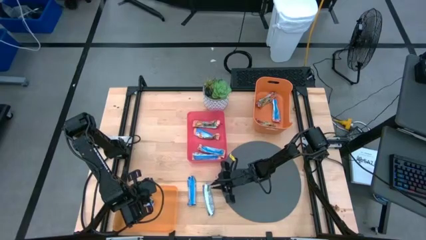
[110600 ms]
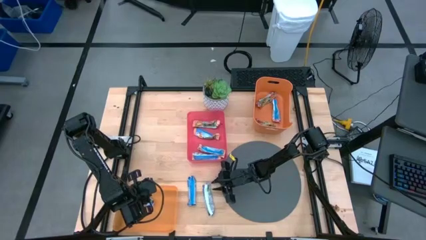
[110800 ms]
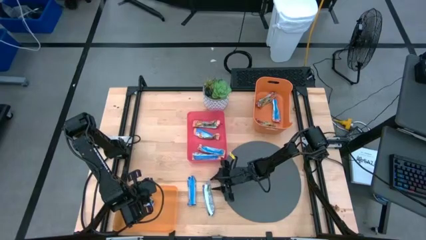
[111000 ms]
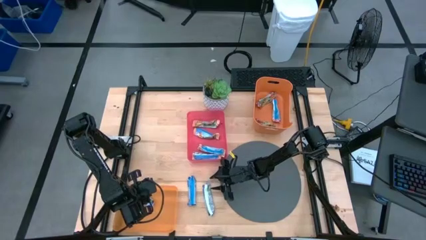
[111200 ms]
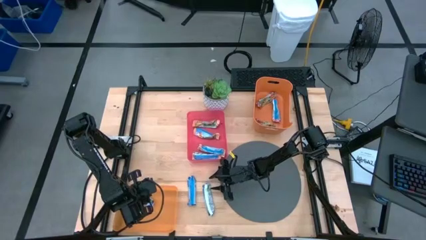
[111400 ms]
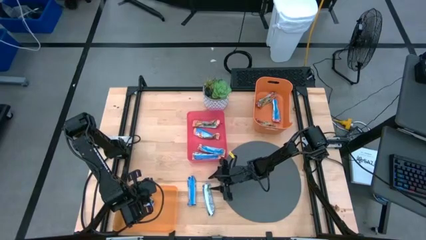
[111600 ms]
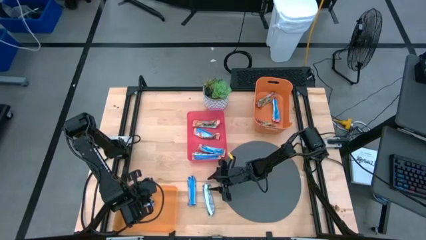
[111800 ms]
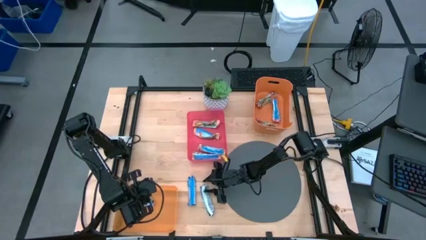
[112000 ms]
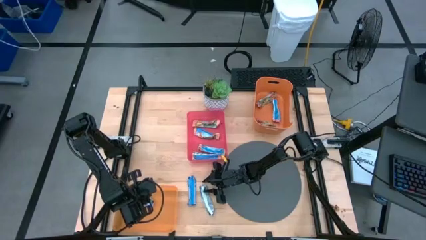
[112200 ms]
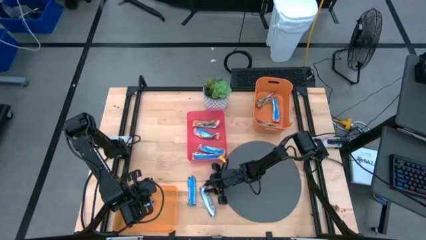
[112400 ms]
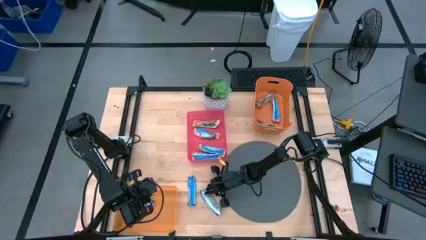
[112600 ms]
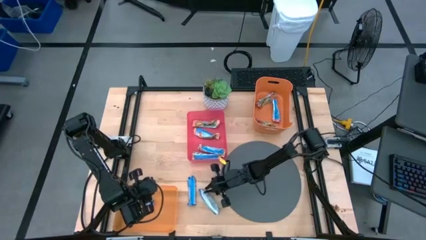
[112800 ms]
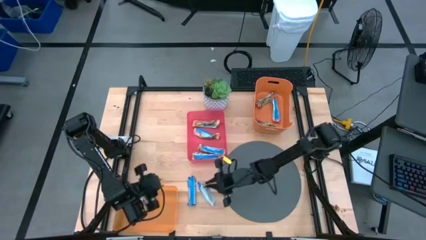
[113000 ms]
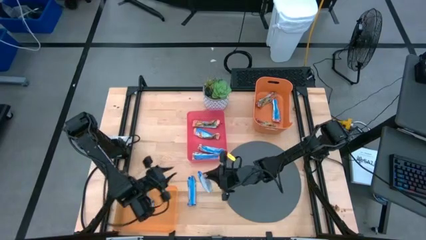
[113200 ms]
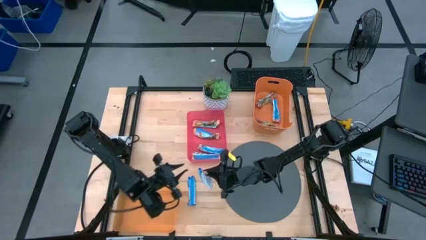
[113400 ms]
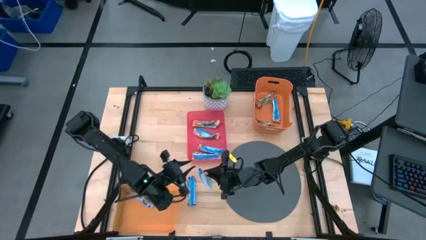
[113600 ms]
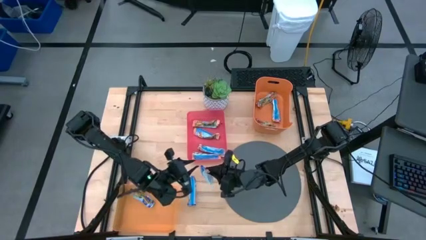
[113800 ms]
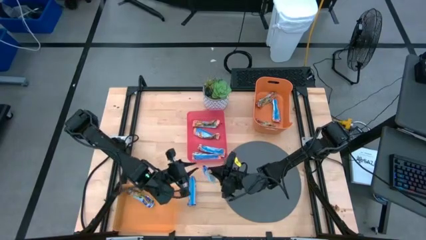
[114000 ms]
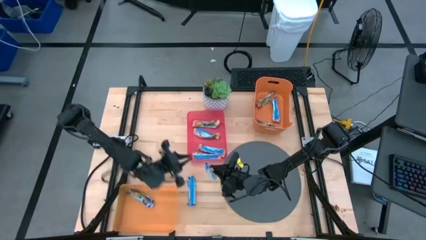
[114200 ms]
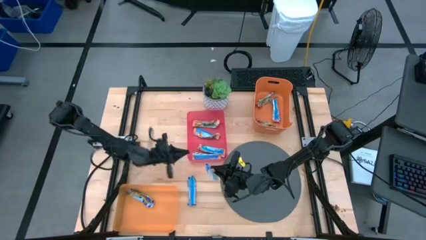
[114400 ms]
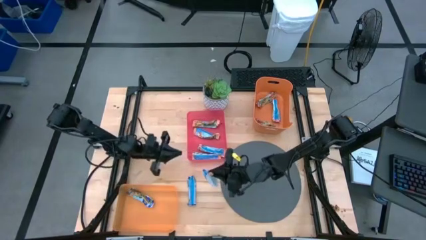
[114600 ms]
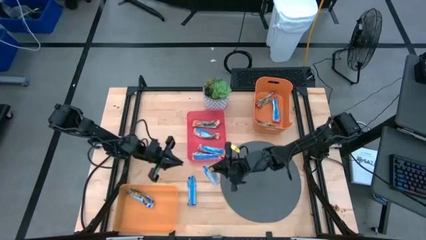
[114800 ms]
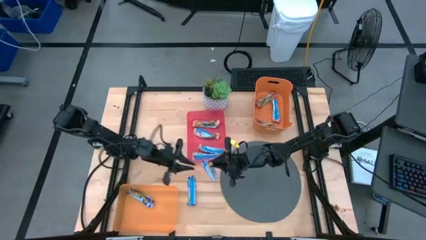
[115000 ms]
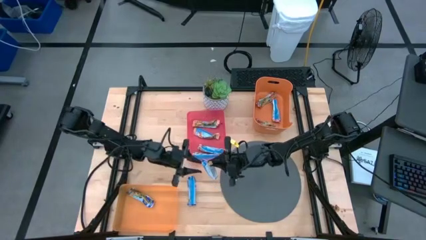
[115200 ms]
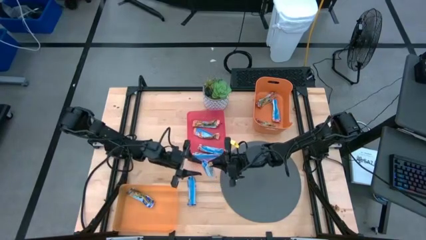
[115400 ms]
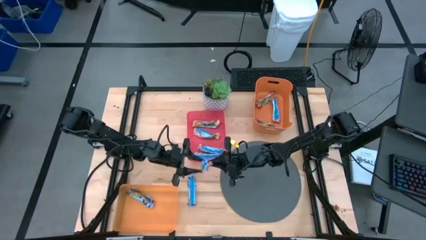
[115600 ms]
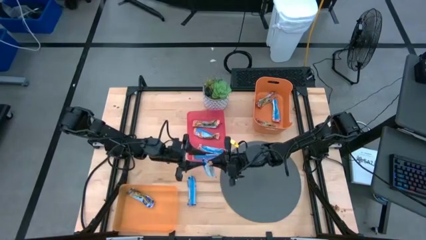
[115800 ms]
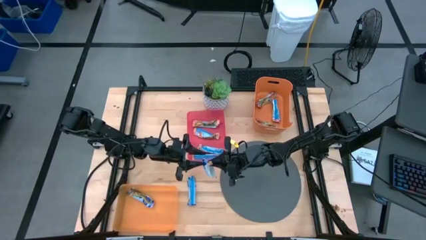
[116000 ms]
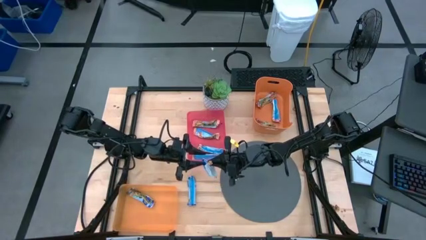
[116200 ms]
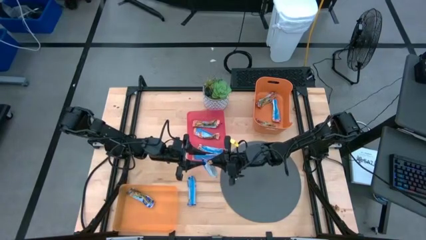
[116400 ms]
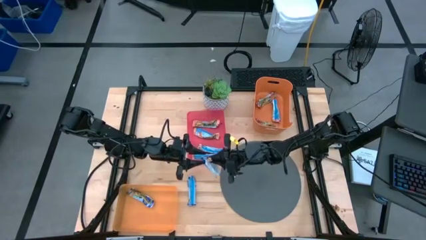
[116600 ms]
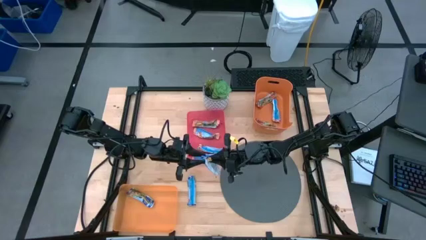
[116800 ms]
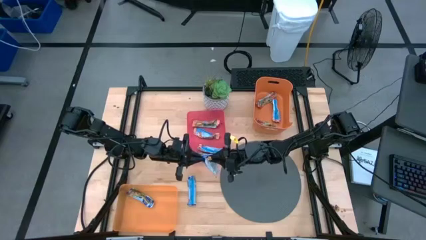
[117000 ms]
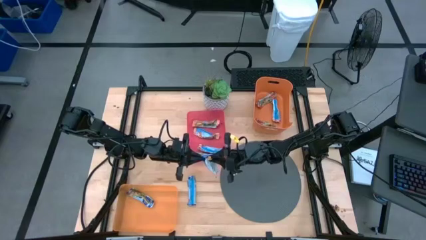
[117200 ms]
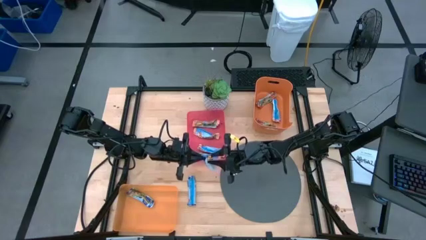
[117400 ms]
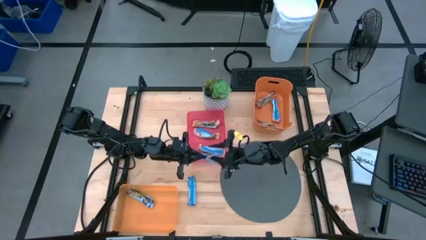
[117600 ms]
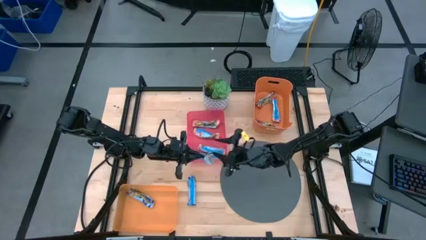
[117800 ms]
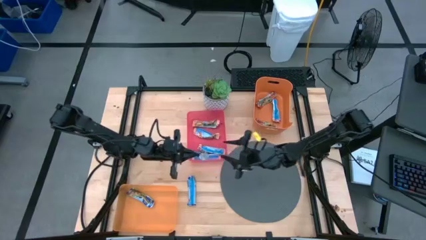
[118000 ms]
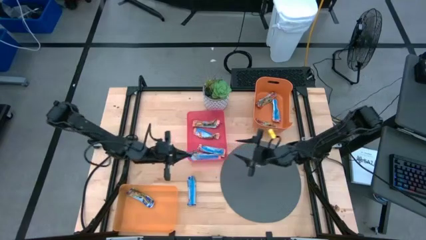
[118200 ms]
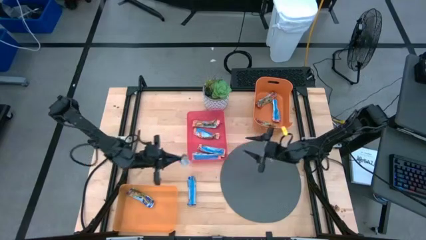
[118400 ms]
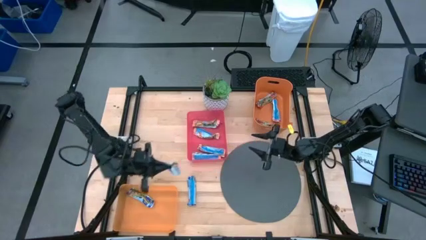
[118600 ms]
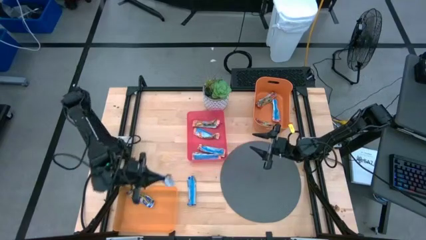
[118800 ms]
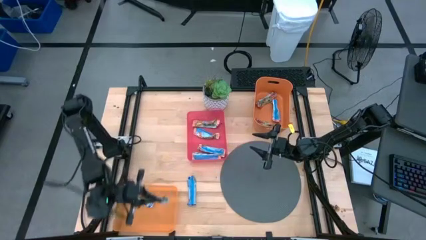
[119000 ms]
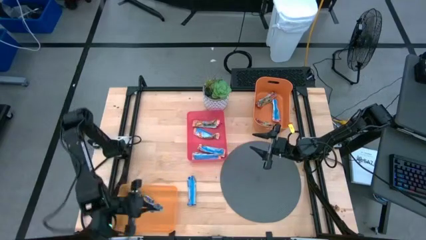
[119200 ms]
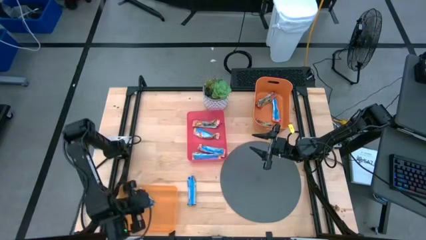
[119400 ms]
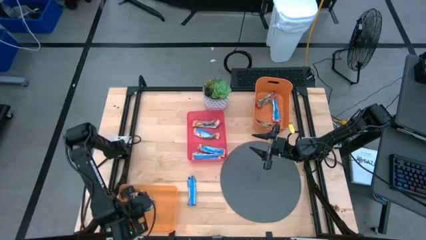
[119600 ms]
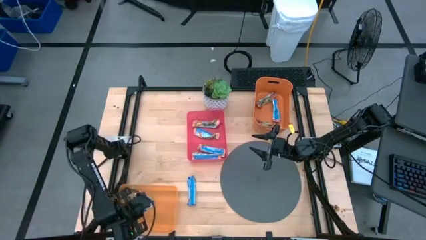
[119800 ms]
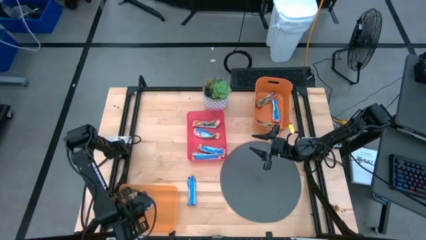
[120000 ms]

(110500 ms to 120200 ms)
Task: Pick and place Granola Bars by type
Put the blue/green granola bar into the bottom orange bin

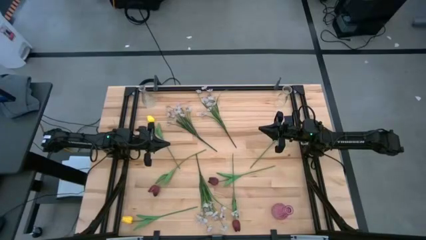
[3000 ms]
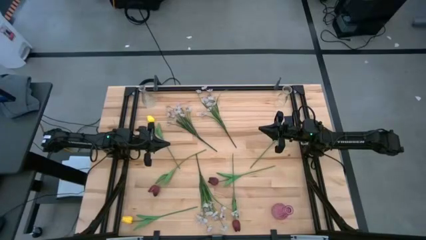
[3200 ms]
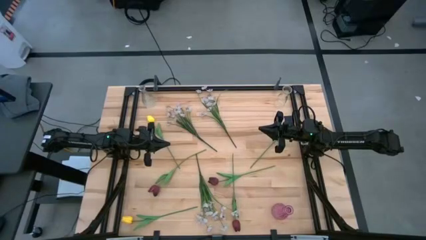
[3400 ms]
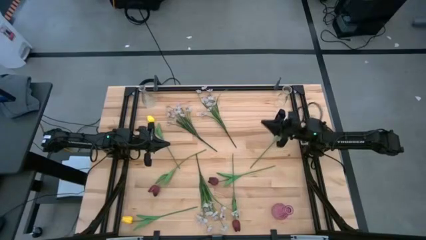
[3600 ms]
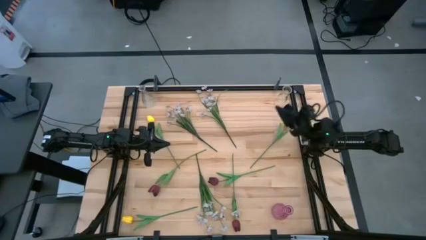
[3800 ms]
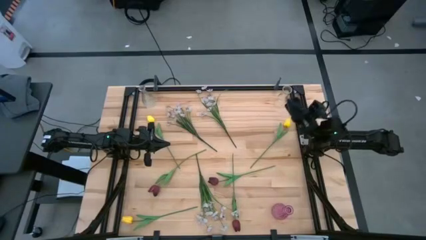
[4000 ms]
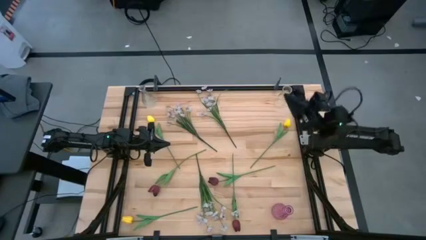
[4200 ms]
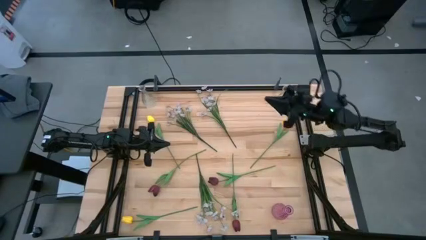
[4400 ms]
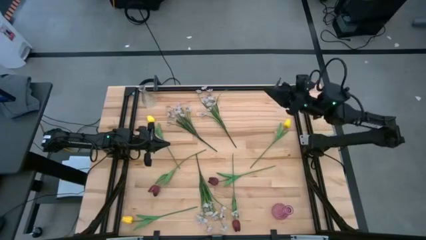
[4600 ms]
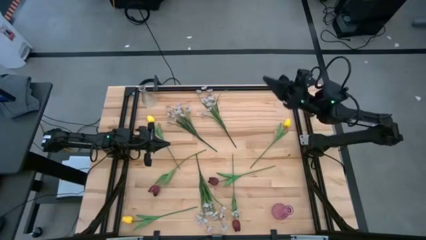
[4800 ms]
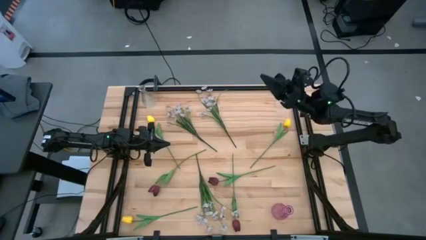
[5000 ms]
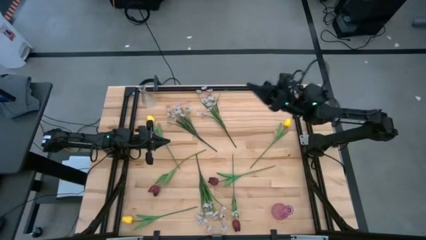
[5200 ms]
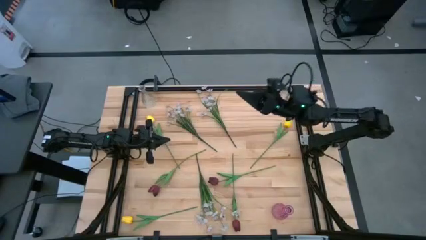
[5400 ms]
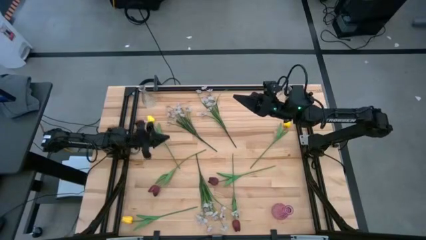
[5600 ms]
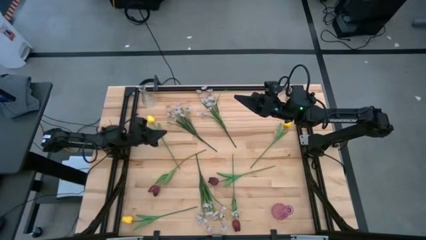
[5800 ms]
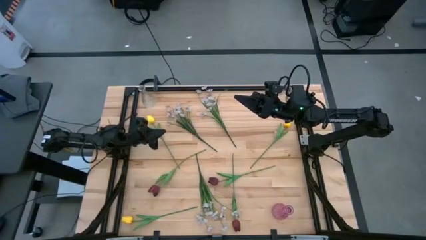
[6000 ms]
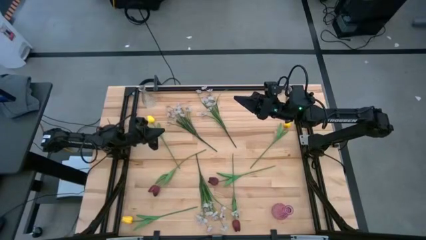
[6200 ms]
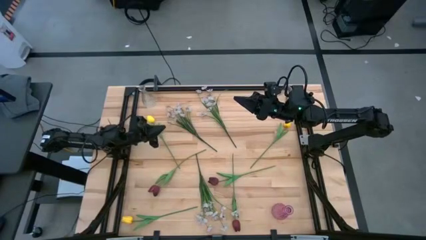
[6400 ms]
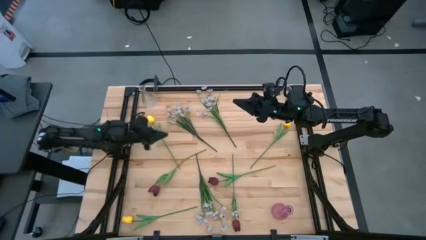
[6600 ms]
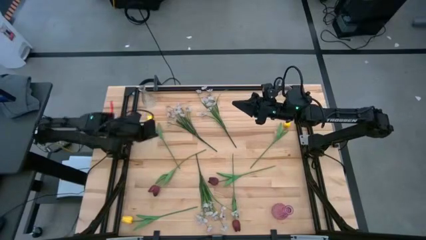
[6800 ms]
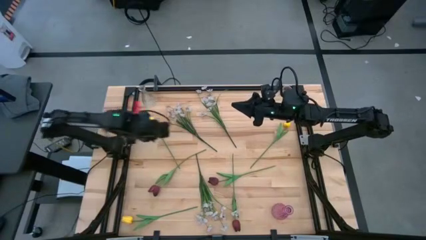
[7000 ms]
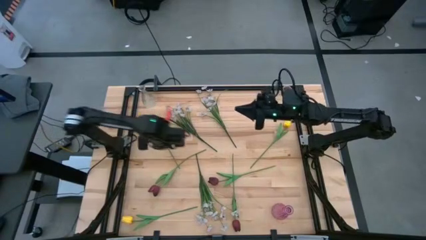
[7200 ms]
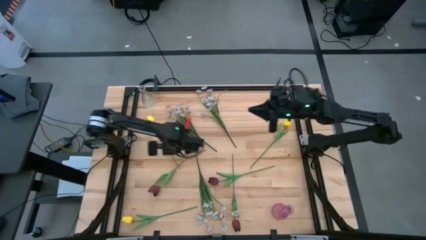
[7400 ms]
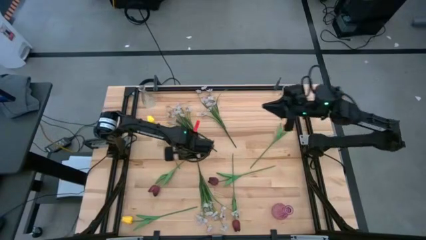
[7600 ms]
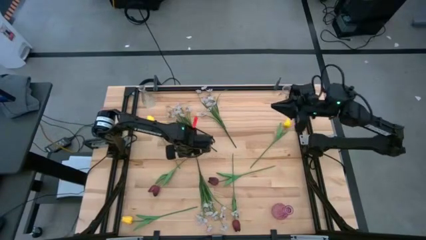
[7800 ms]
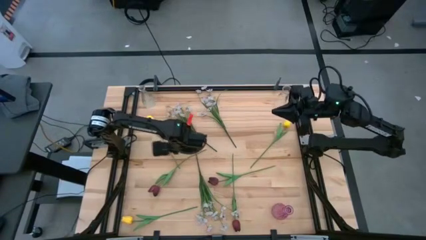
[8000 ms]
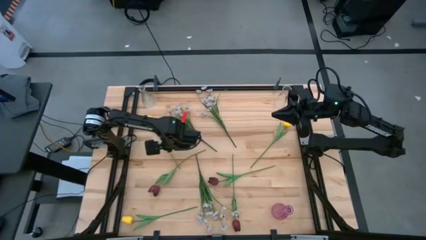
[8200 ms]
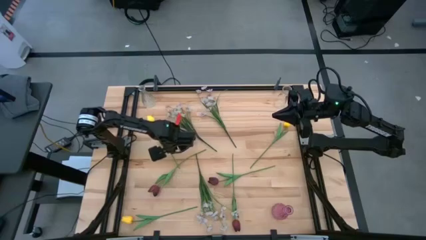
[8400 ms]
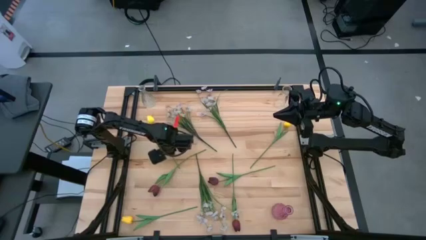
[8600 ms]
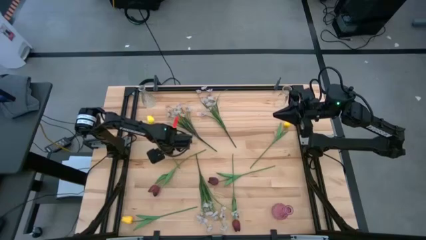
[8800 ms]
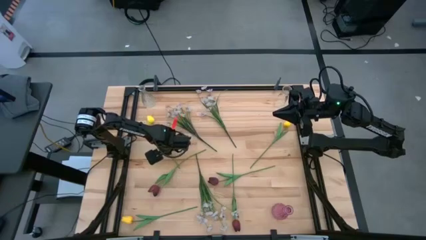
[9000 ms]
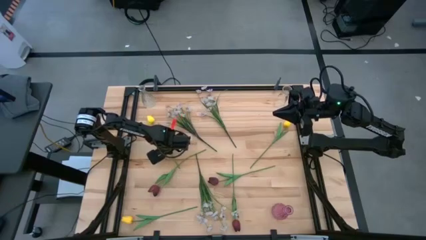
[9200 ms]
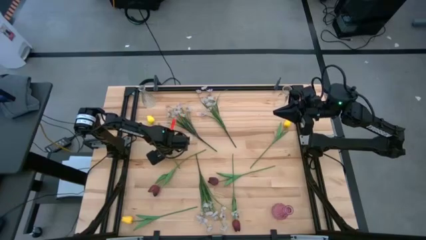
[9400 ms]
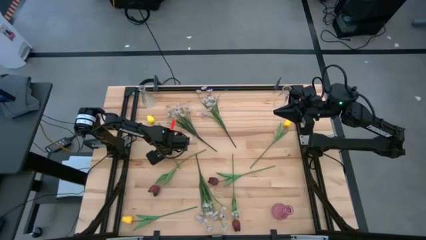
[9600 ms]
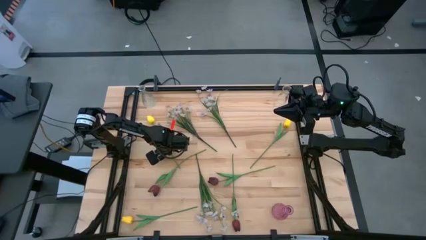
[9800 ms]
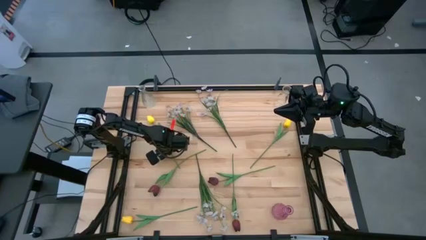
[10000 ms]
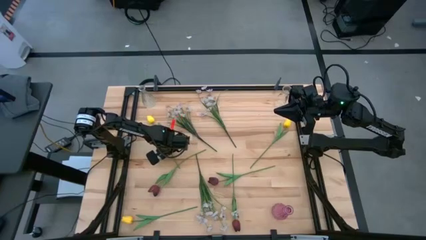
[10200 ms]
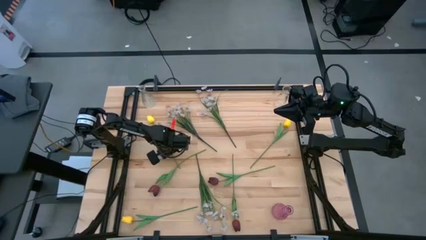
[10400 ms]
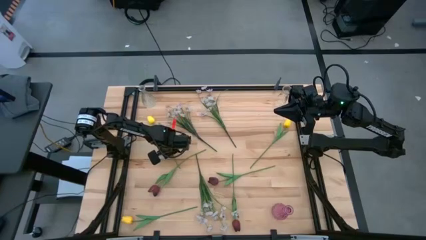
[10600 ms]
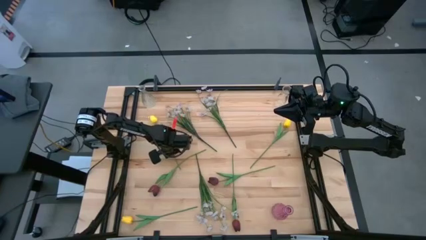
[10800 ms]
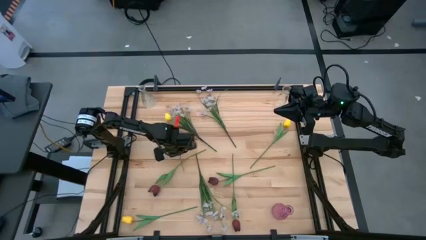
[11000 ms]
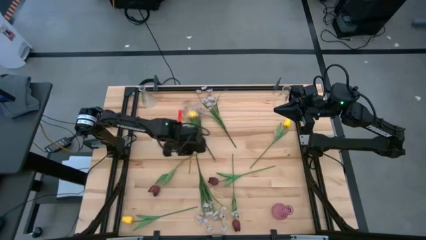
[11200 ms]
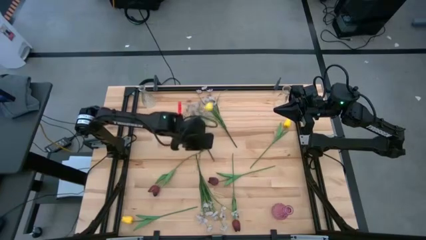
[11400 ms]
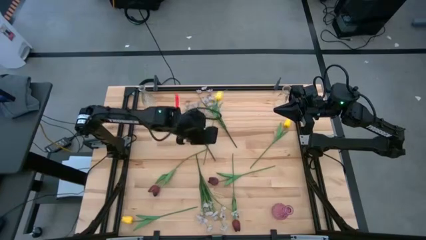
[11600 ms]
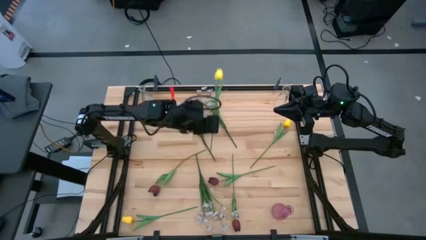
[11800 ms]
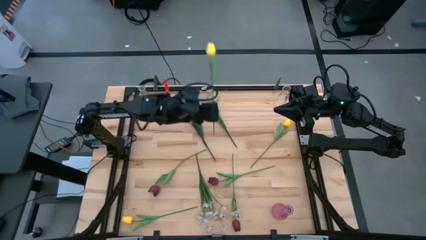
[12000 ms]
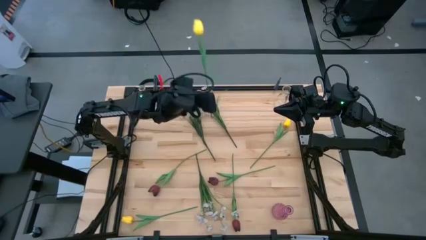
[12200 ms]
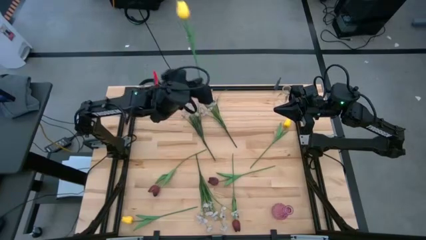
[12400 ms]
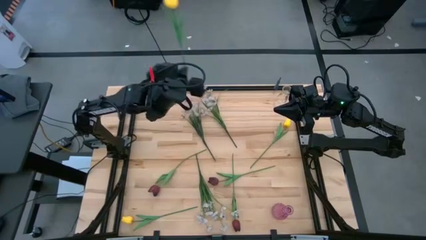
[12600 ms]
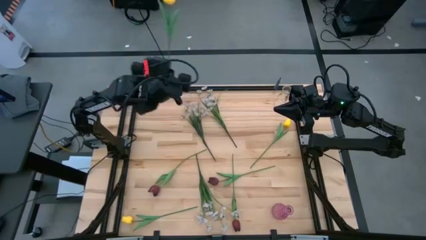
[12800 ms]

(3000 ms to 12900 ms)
Task: Sort flowers into vase by color
Put the top left yellow flower into the left transparent vase
